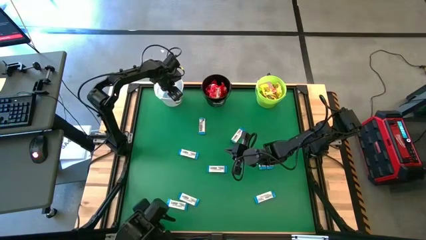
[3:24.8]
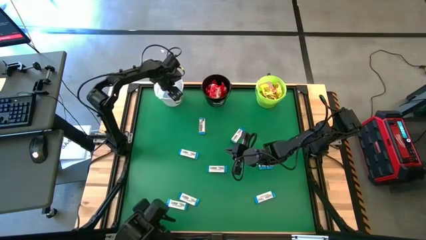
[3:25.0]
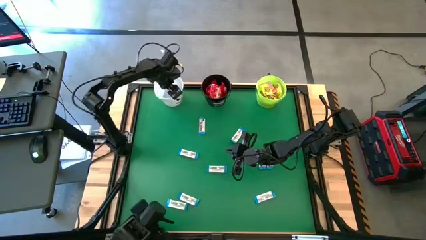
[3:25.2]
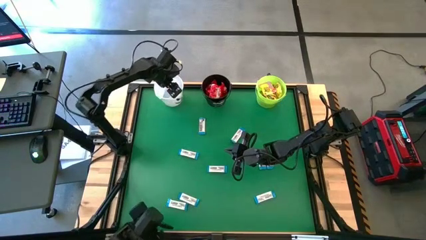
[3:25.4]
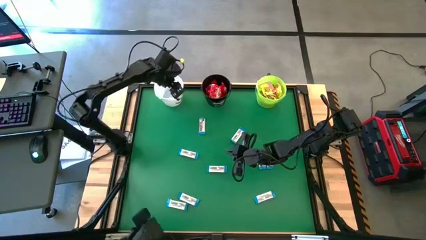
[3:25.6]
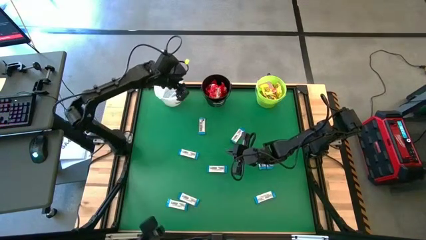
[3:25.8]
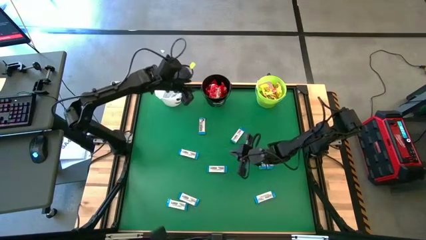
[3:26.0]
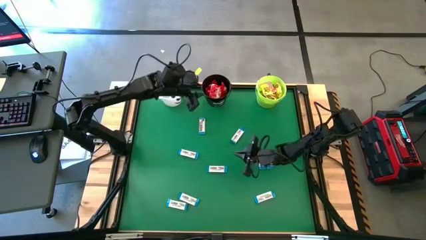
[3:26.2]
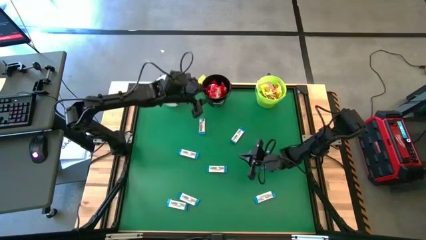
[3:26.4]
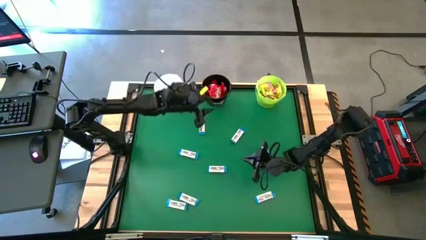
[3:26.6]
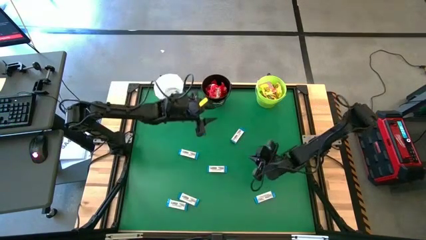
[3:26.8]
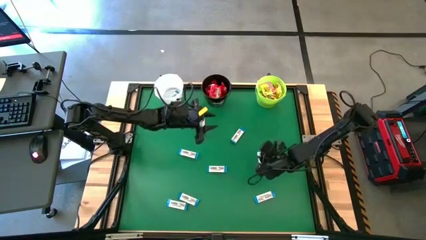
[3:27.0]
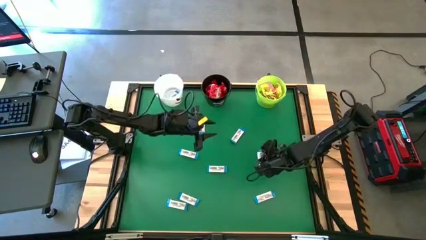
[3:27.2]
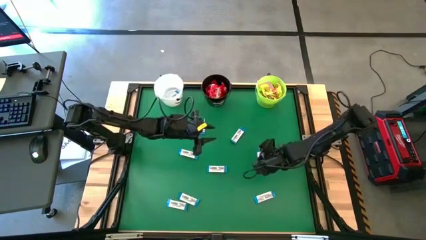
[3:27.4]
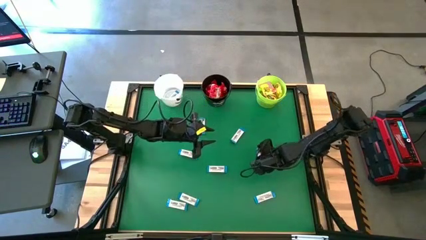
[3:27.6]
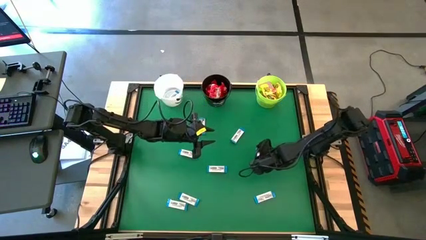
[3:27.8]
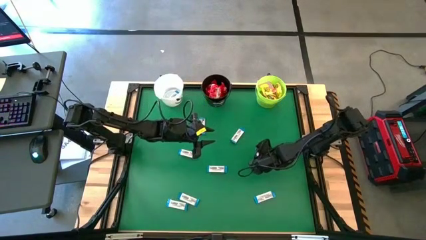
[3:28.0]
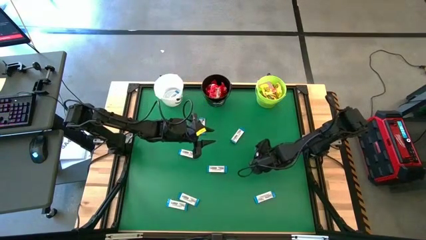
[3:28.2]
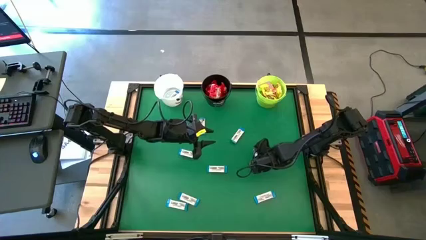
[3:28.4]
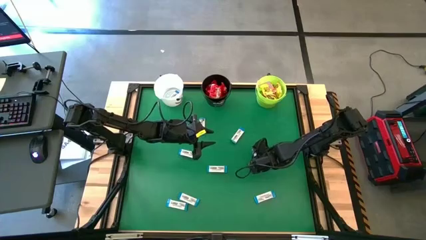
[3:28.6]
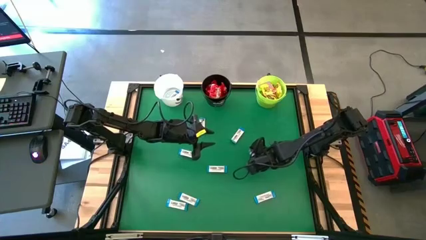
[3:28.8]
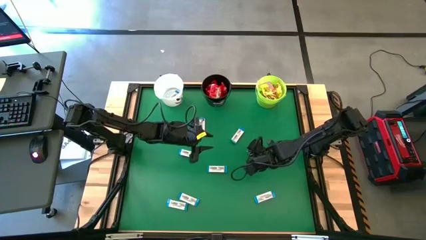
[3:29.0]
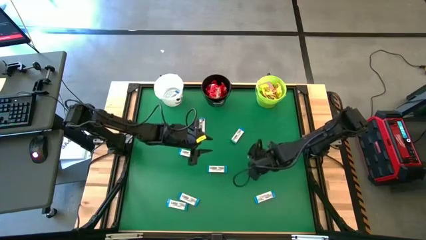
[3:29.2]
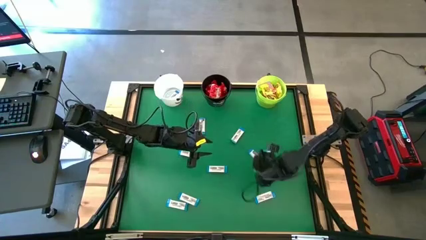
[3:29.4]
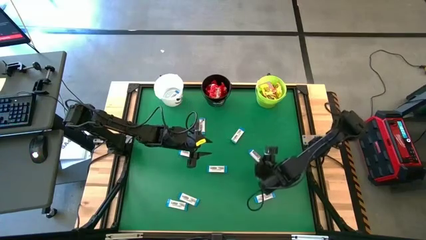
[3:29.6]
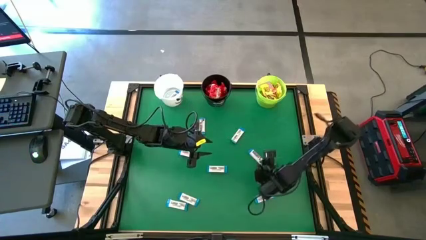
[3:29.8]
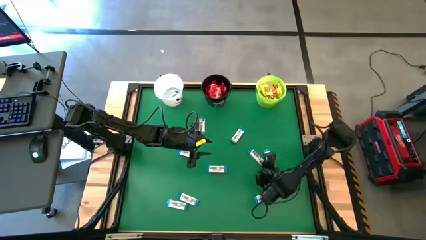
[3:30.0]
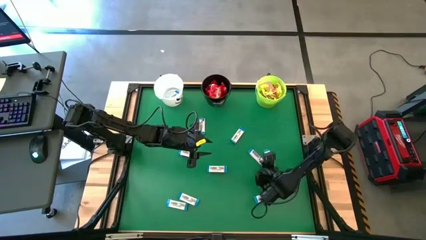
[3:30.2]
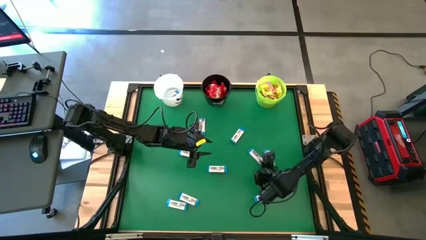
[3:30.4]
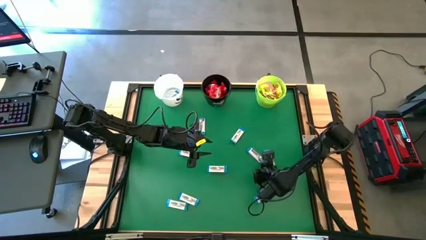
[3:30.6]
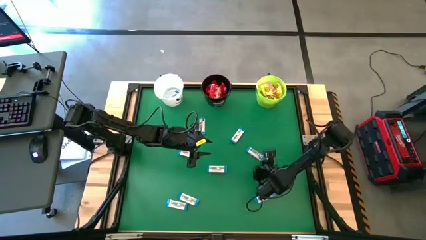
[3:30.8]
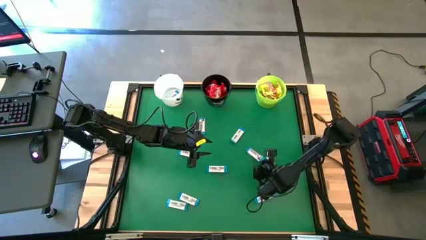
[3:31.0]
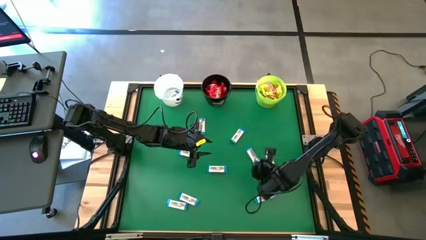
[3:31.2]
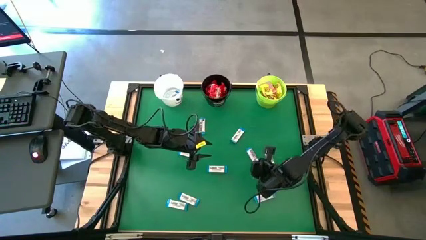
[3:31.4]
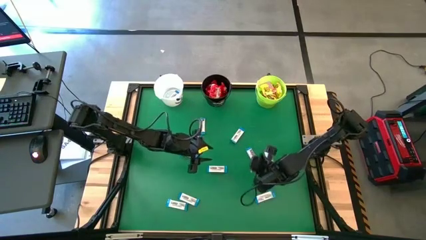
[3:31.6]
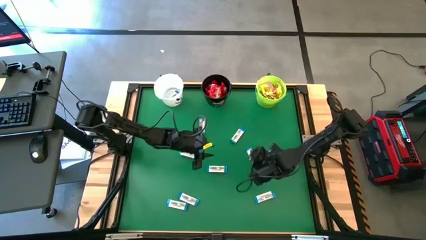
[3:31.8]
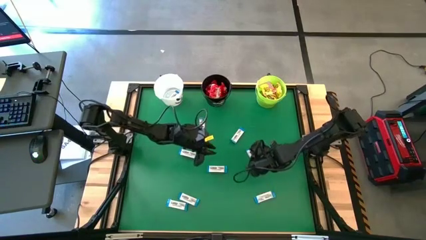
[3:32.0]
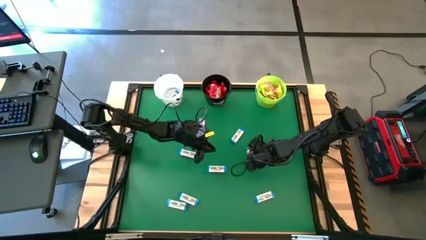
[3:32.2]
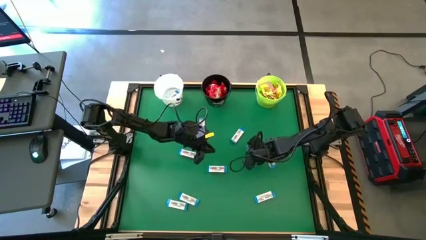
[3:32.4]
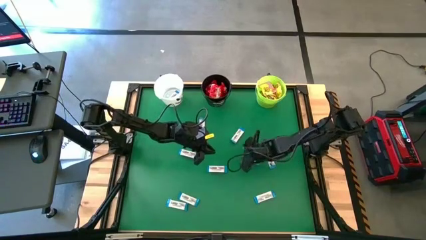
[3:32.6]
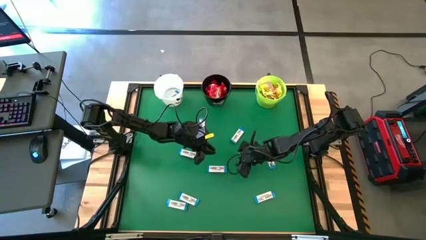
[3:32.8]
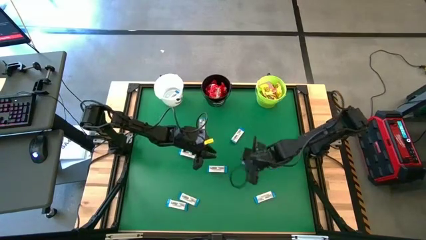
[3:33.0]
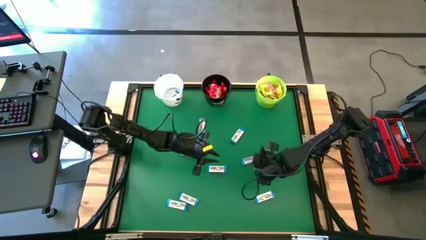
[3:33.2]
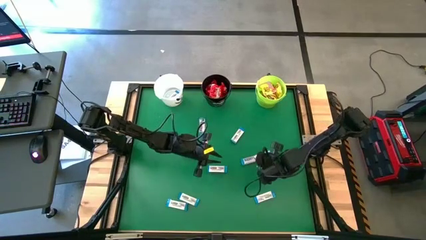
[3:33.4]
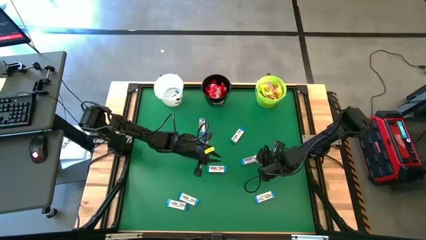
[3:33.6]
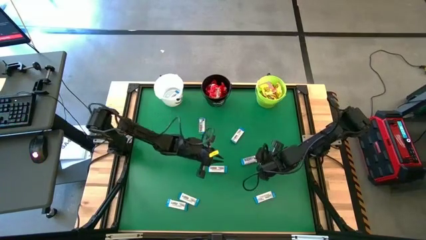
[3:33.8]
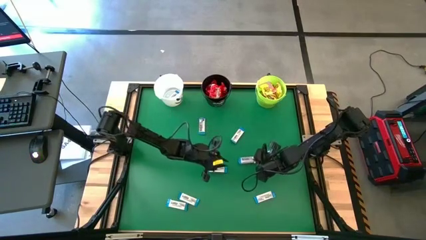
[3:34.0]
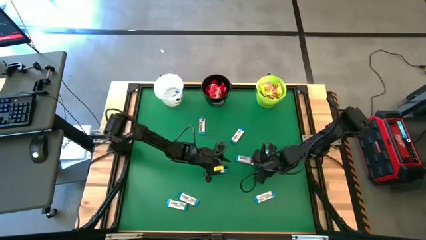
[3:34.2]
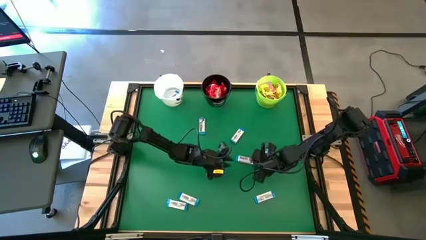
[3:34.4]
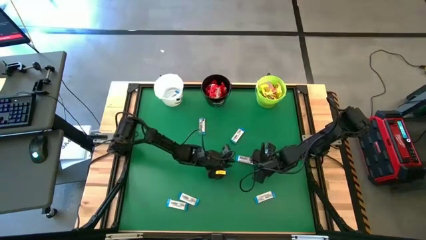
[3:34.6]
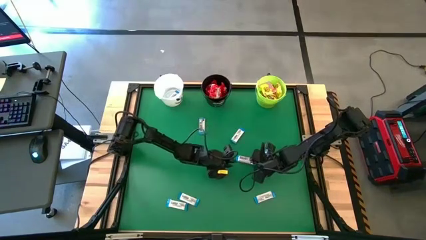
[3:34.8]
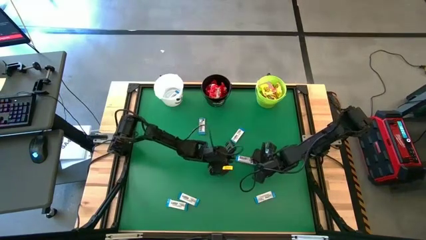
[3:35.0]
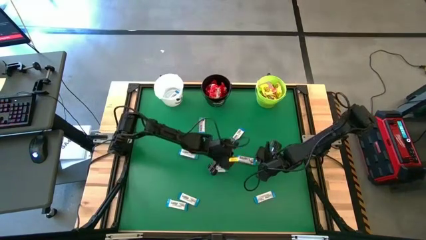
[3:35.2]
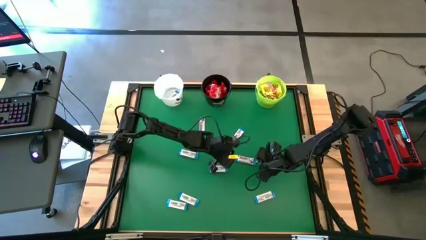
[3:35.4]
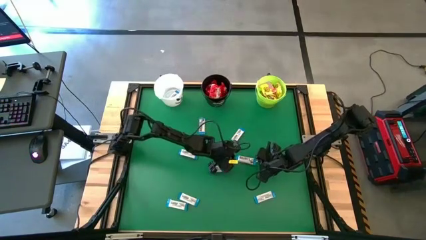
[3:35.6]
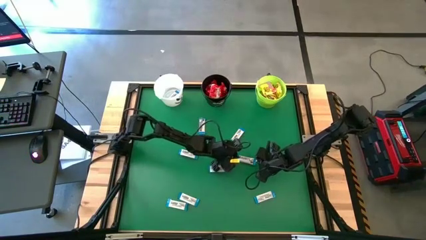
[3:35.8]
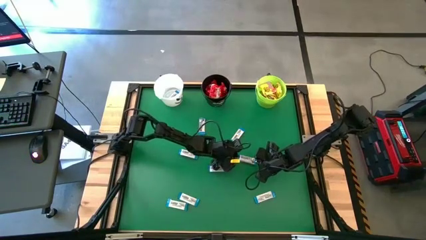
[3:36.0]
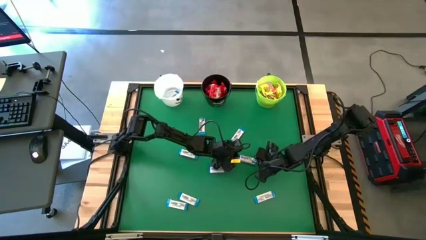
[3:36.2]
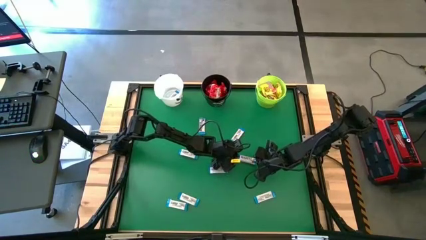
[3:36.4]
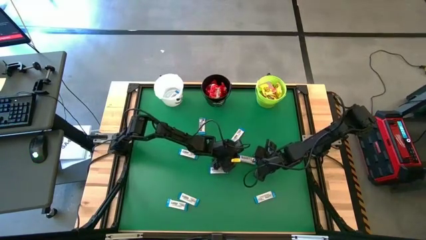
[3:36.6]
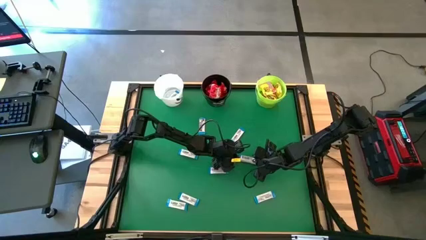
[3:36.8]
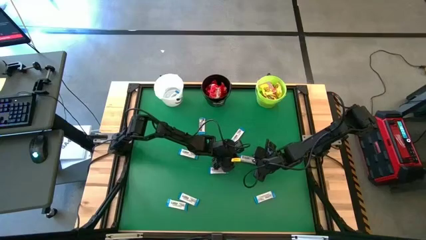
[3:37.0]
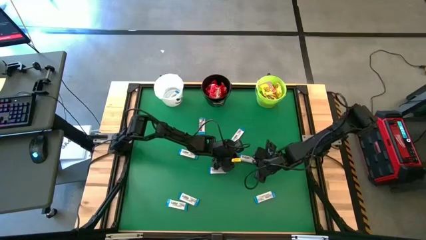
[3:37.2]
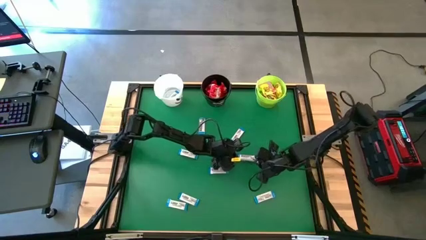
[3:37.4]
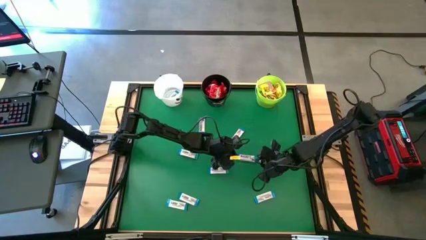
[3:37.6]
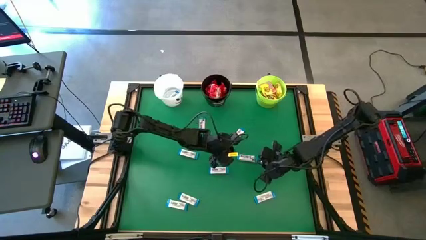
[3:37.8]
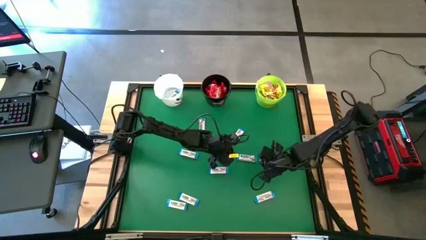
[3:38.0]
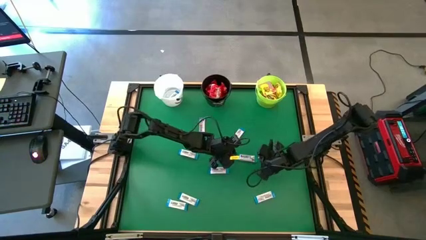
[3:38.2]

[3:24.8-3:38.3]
Task: Sort candy by brand, put in halloween buckets
Put the white chocolate bar into the white bucket

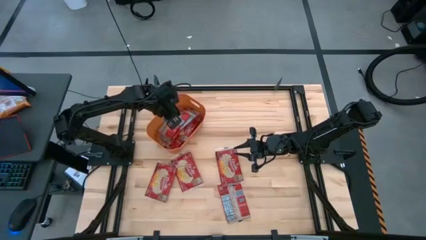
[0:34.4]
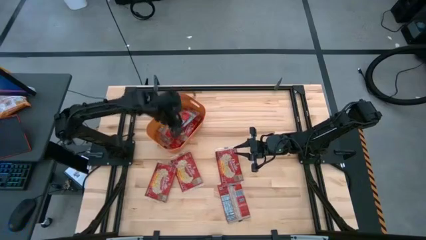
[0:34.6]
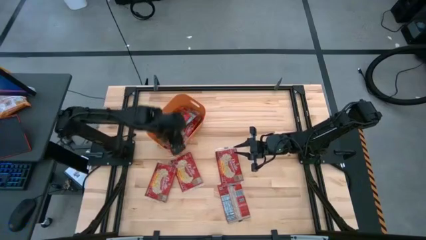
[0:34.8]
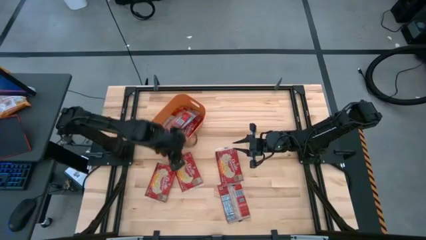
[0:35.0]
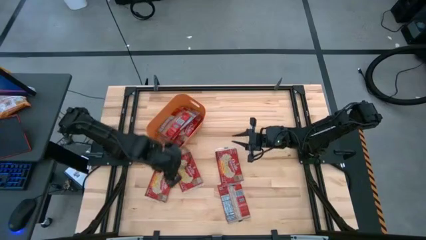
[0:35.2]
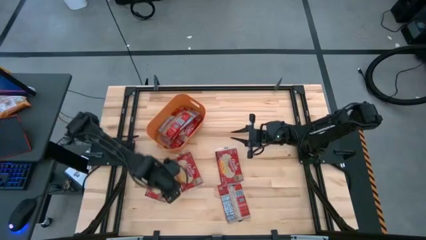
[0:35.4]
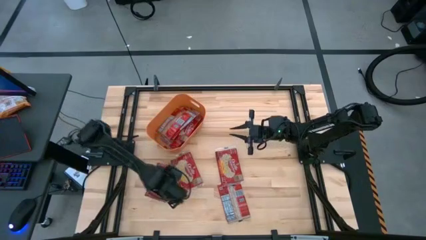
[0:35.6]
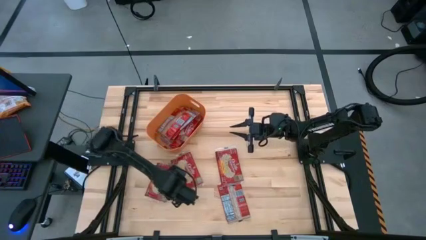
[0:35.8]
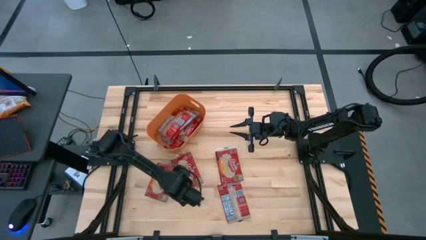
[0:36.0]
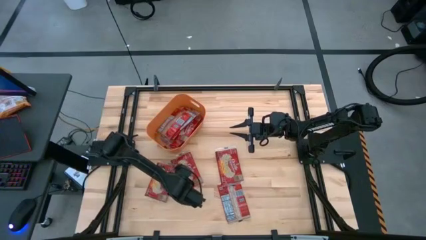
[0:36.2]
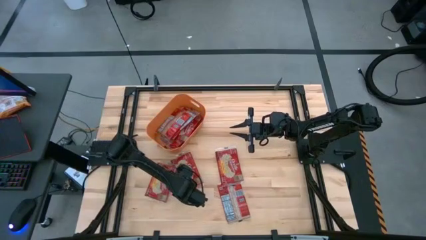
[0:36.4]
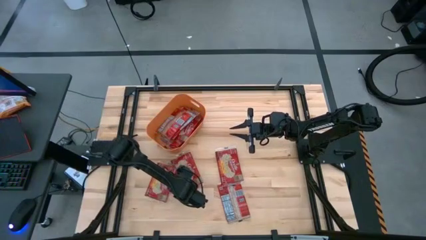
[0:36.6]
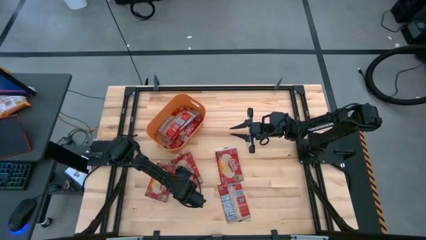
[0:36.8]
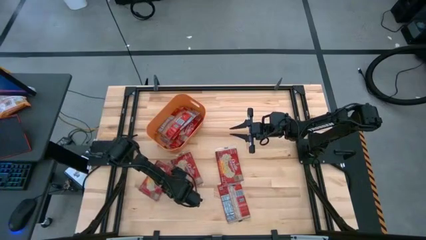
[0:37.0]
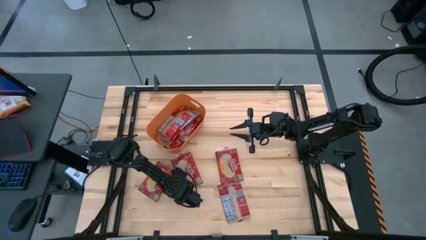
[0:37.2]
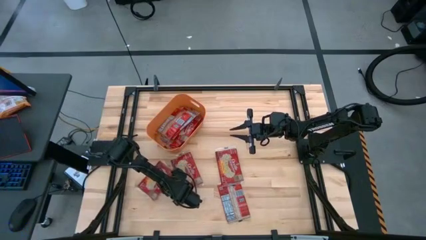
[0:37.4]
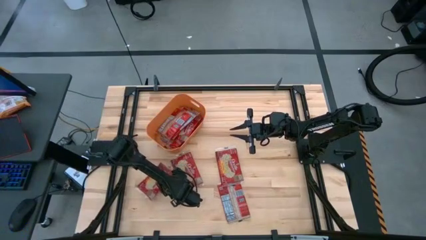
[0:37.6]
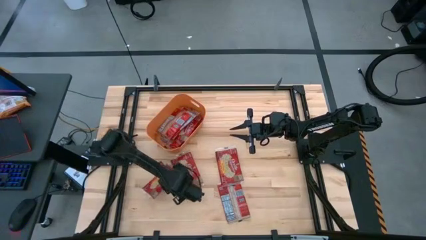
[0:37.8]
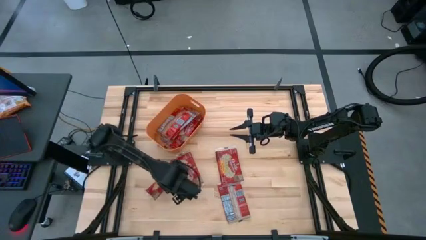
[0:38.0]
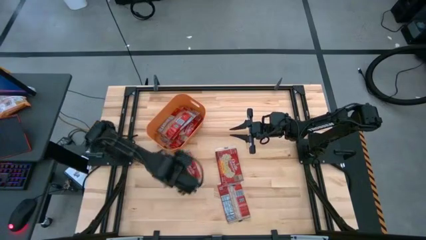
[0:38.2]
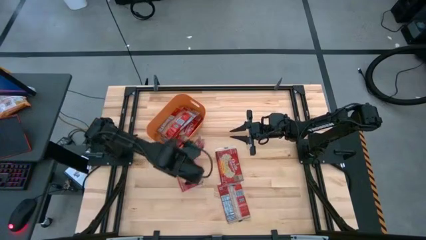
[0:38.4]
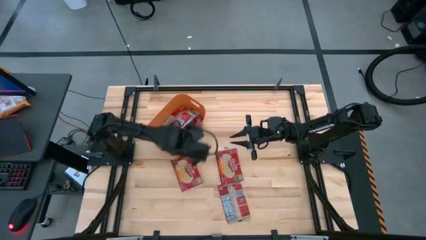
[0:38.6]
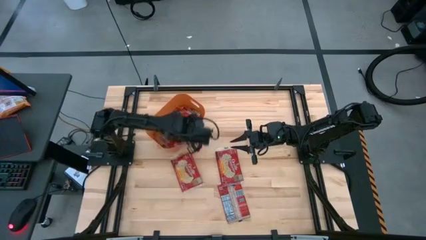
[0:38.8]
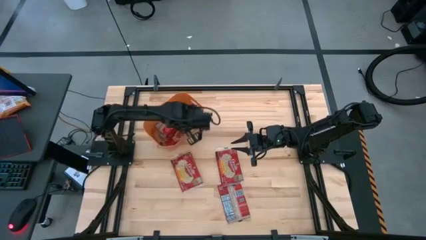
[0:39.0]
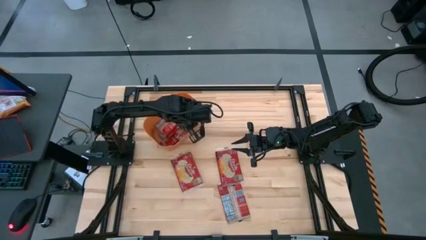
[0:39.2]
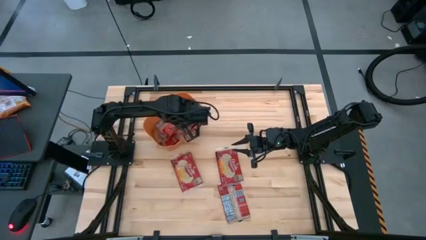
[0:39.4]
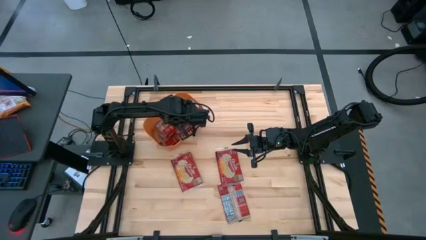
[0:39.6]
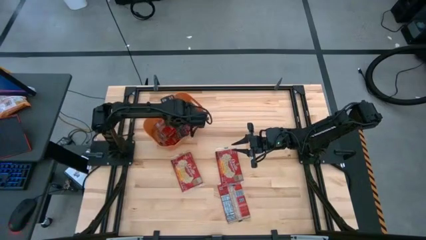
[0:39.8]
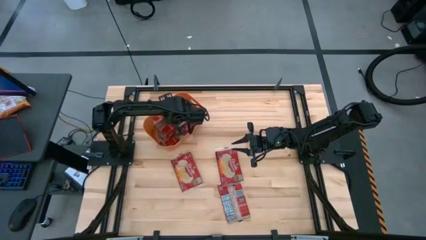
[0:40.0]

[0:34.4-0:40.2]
Task: Sort popcorn bags into baskets
Put the red popcorn bag into the orange bin
